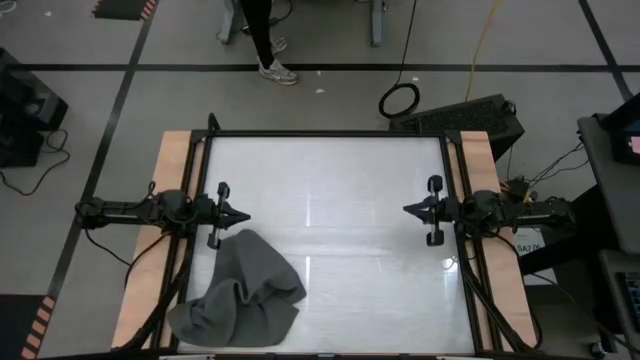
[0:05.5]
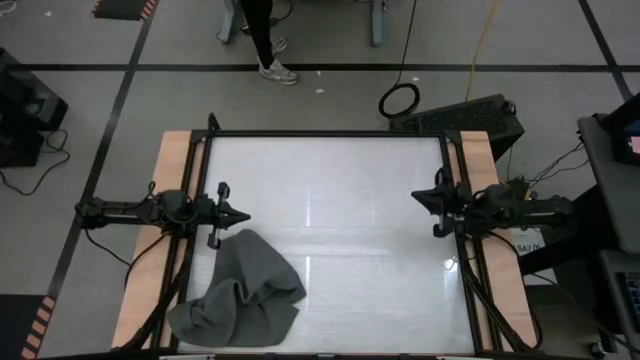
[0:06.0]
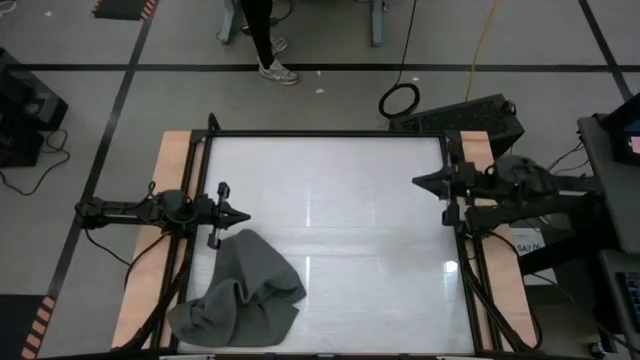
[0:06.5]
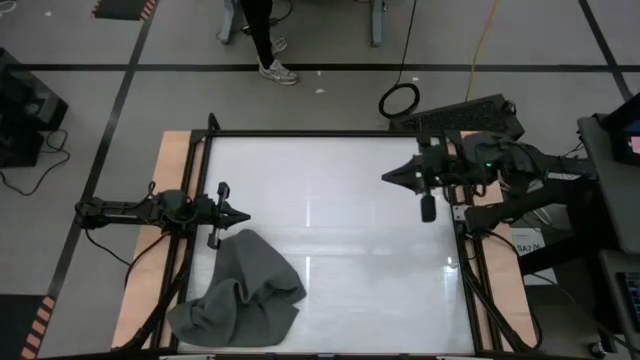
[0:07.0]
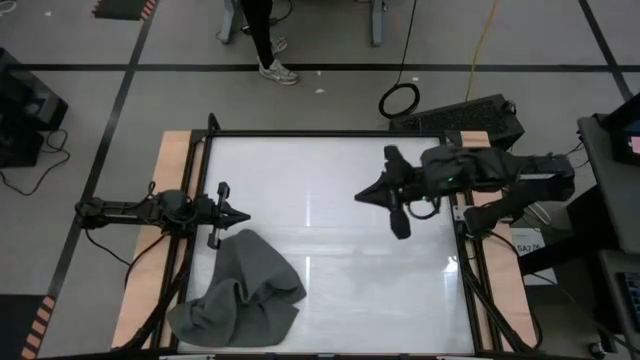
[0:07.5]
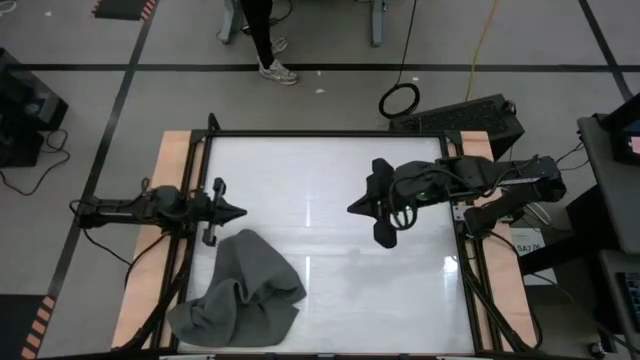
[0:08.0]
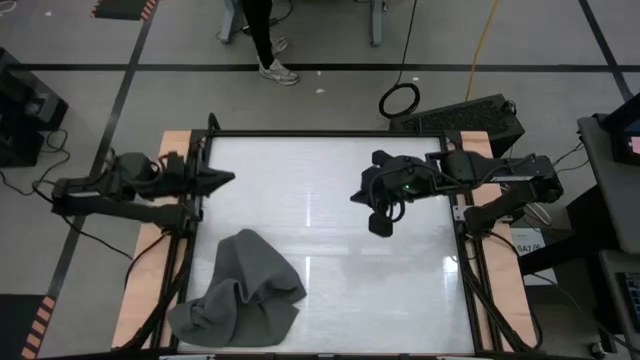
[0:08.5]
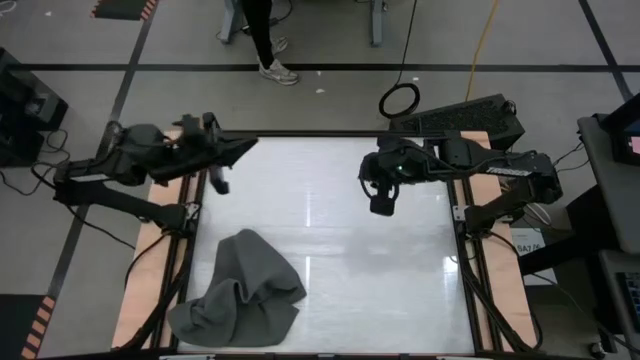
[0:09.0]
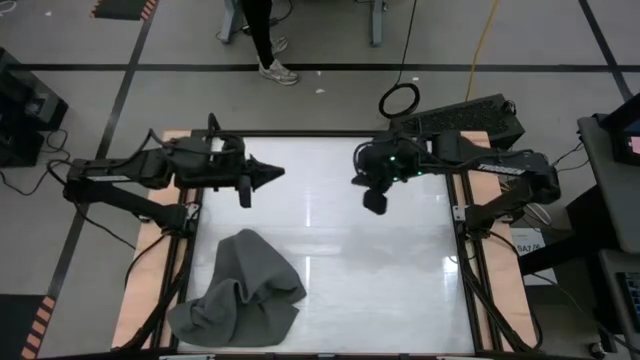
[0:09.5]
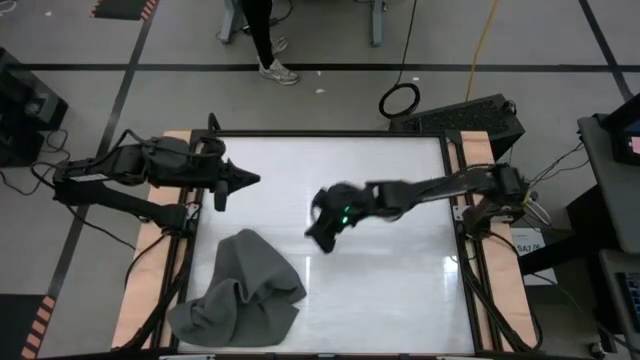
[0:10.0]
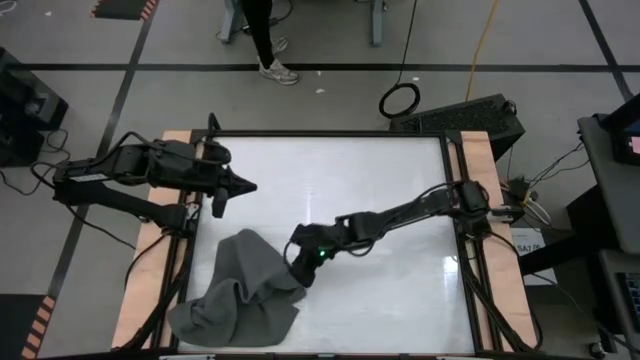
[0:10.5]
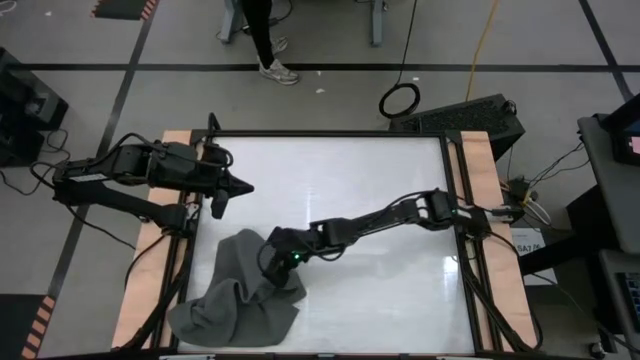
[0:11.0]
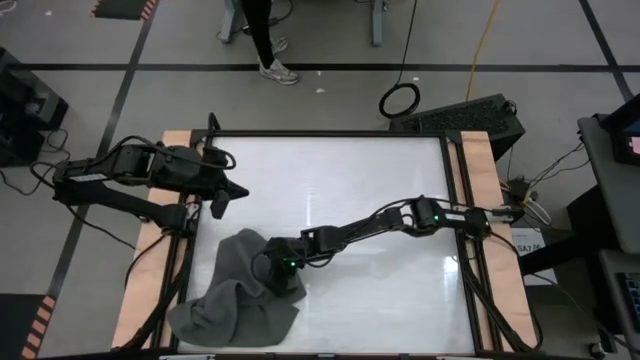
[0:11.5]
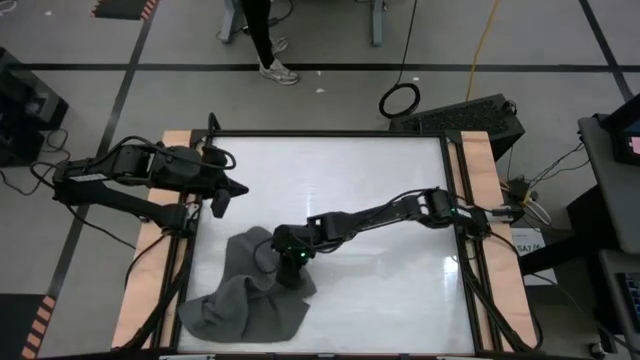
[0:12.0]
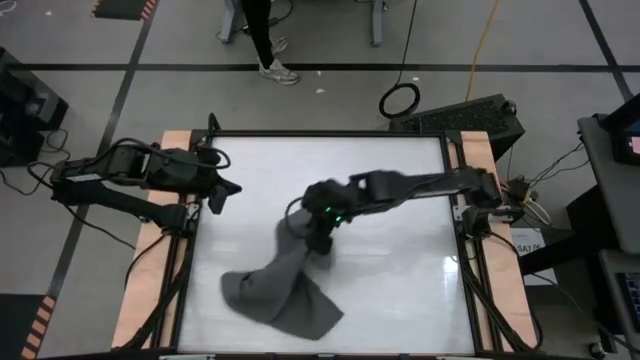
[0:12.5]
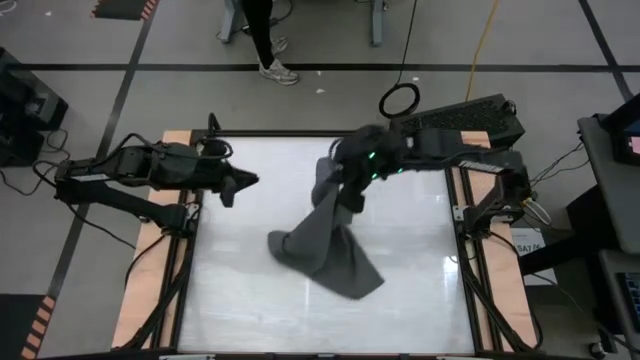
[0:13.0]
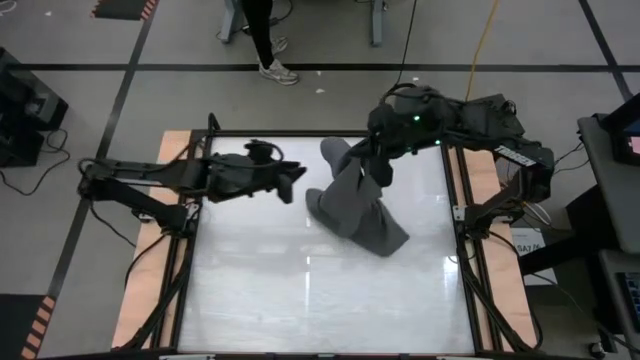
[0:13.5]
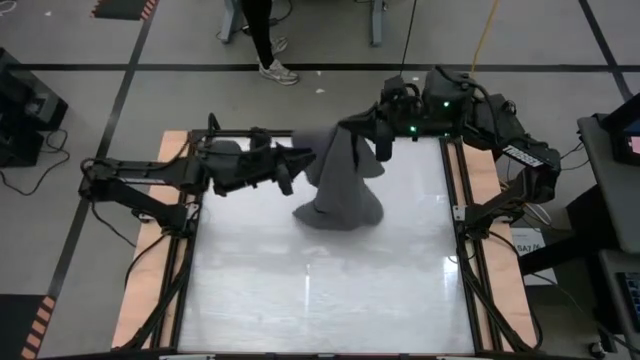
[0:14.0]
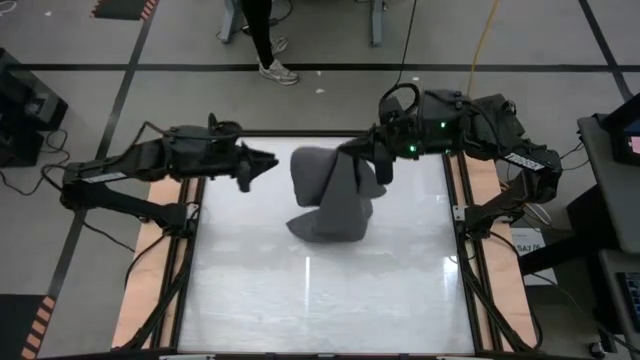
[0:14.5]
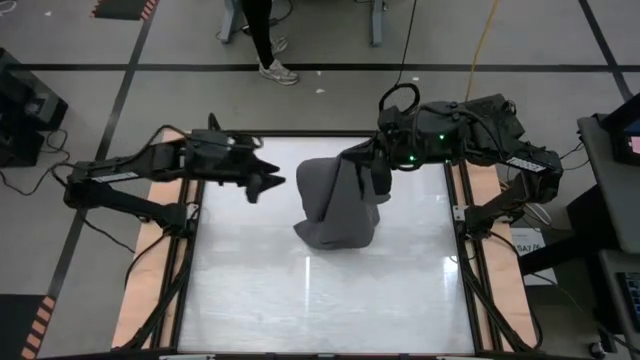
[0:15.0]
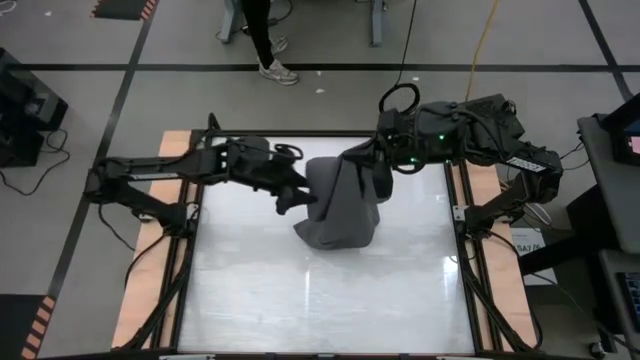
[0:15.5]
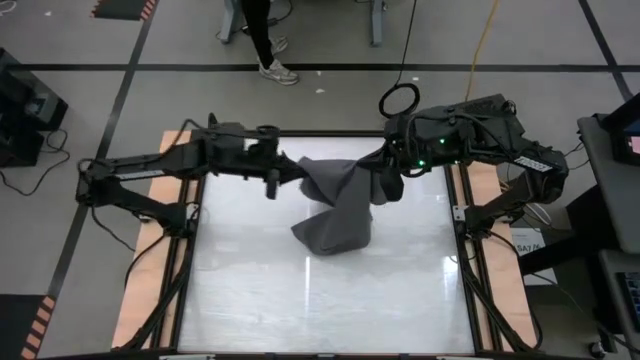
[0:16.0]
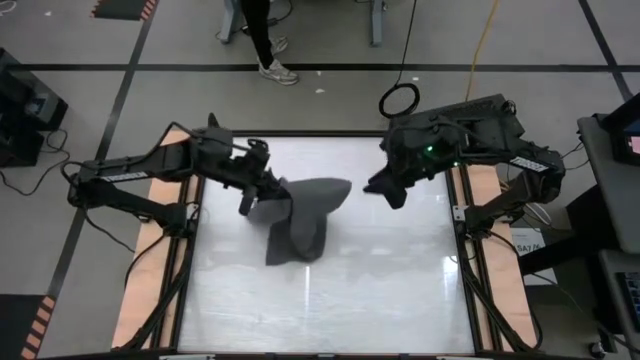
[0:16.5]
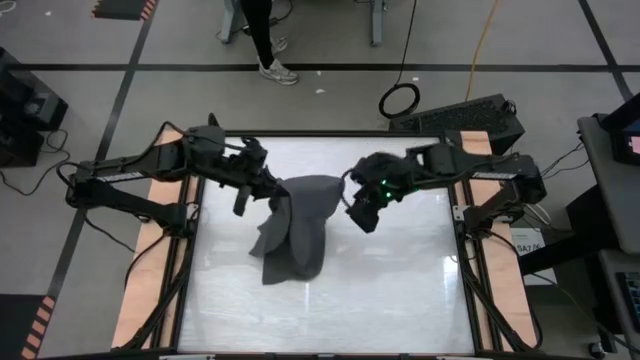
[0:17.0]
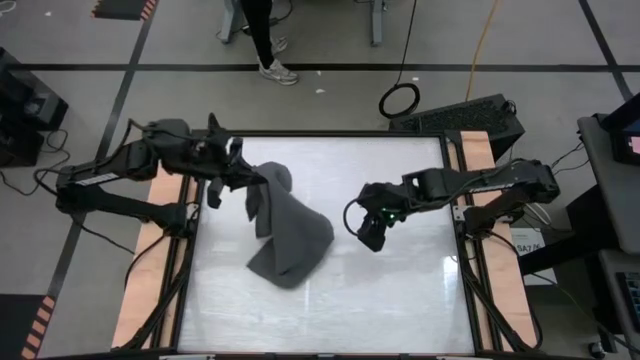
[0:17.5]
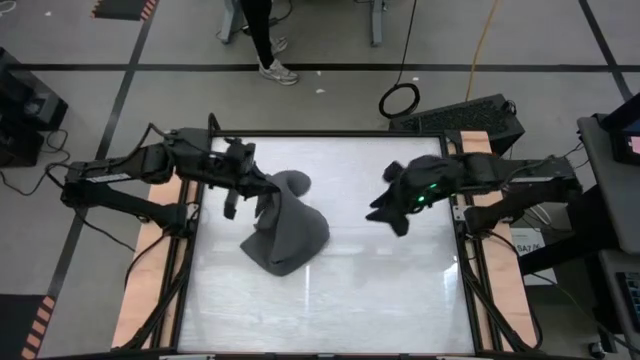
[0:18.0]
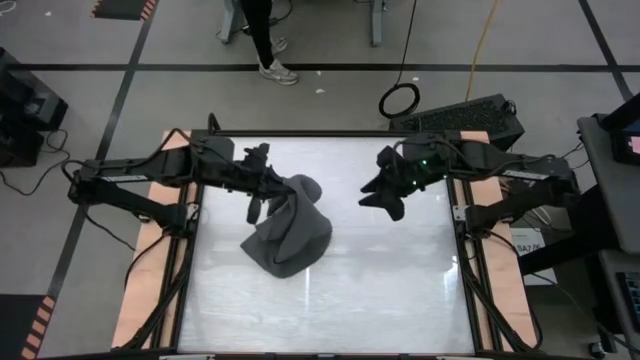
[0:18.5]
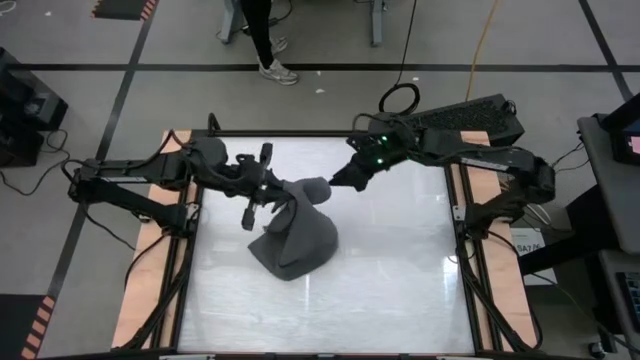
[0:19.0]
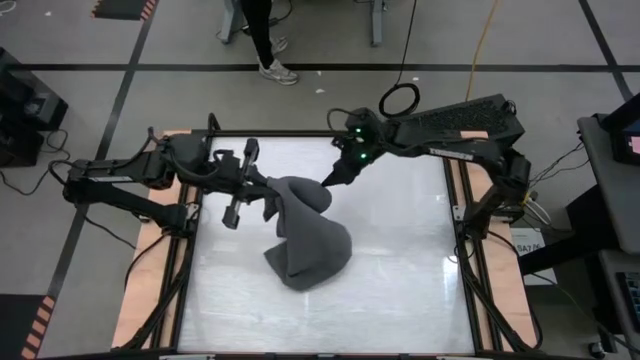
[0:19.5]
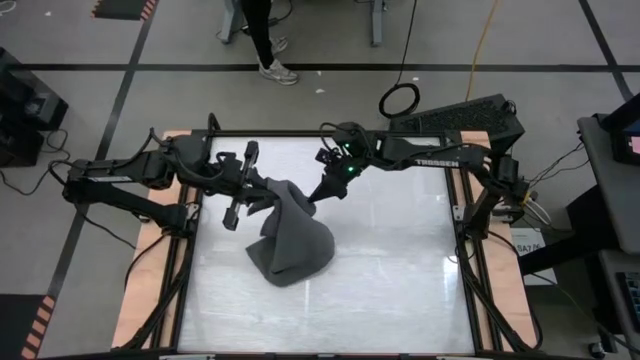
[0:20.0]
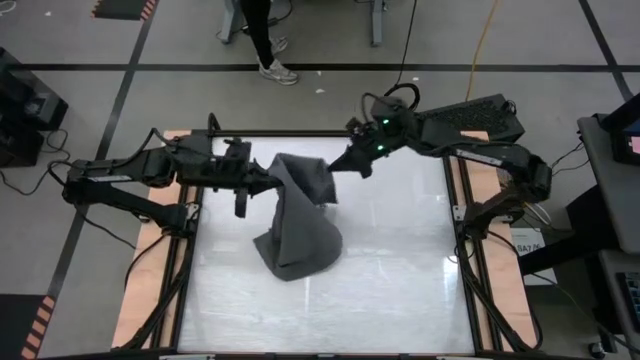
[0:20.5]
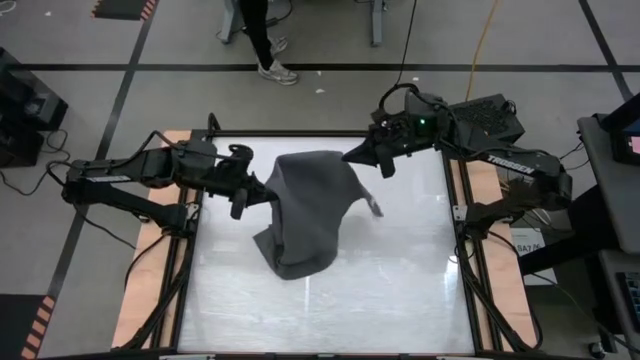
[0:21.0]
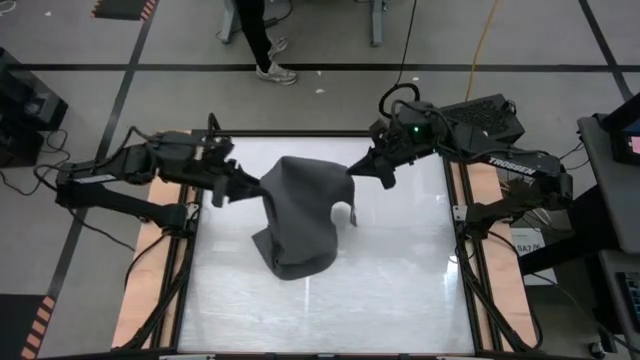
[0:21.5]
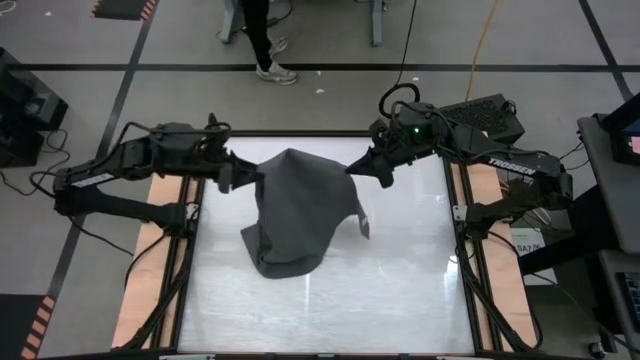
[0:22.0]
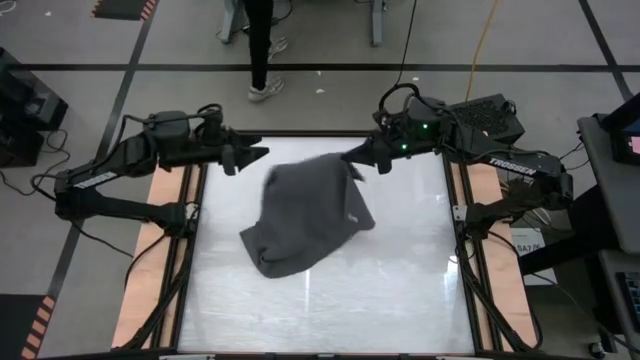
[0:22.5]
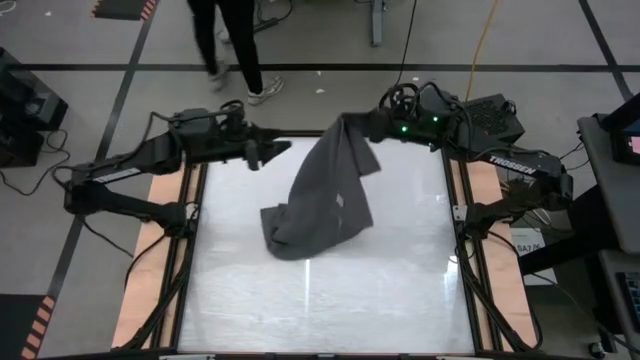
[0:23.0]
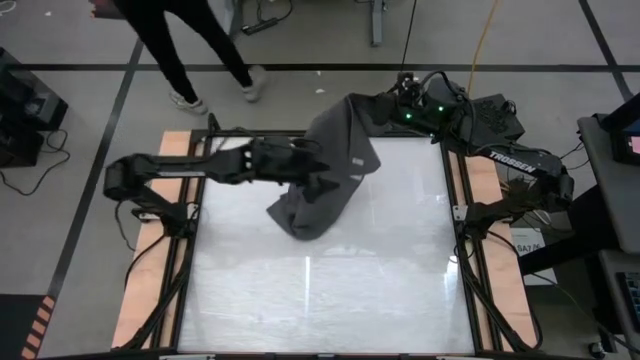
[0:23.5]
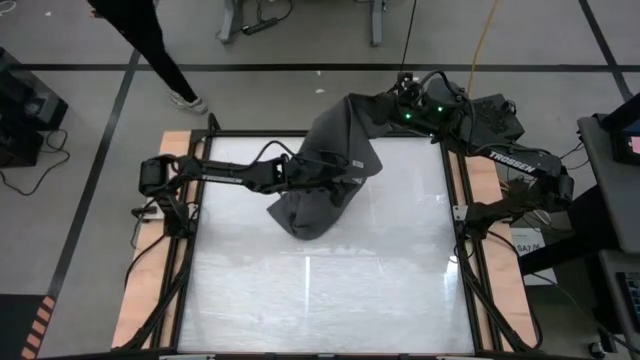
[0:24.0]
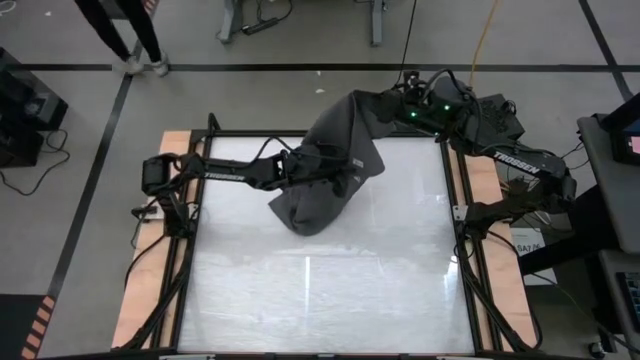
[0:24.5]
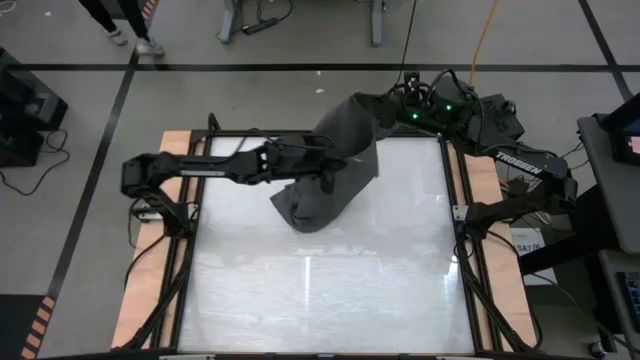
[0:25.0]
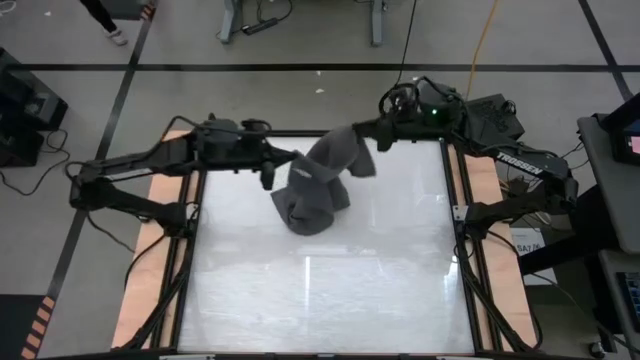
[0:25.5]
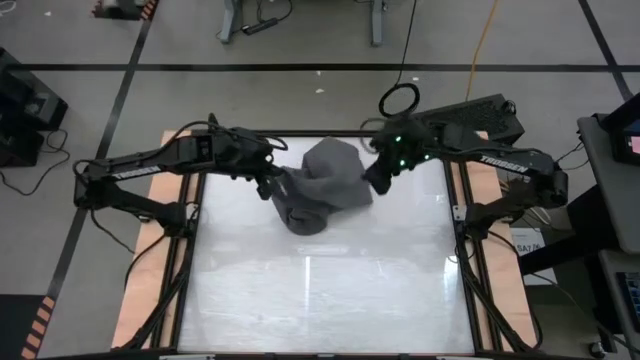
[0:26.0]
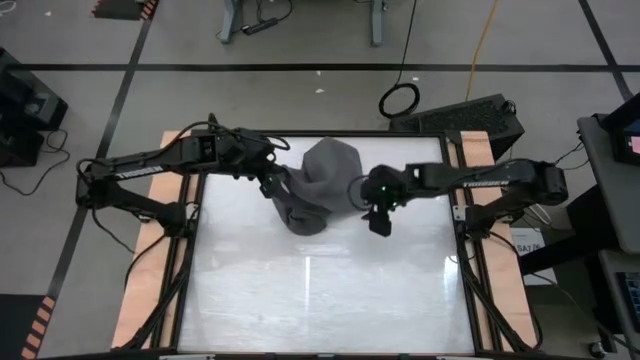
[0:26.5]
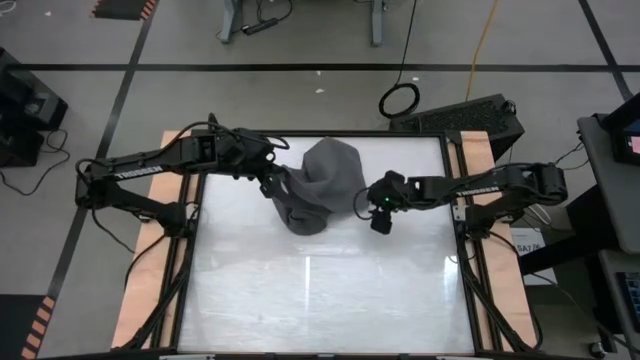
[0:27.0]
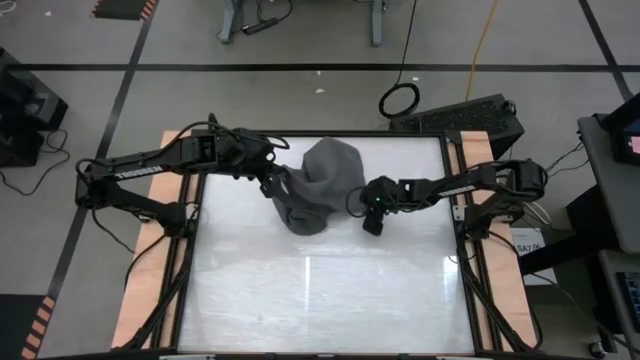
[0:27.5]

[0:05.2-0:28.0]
Task: Roll towel
Roll the gray towel
